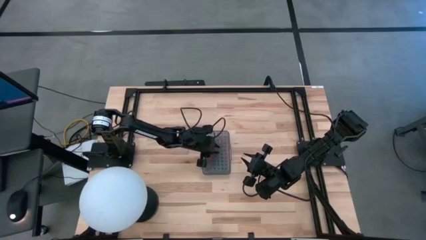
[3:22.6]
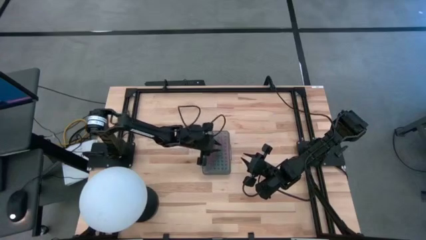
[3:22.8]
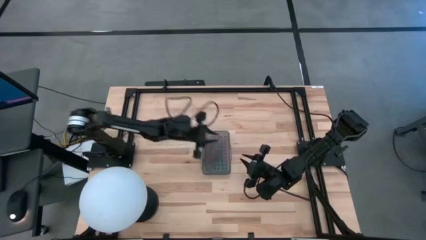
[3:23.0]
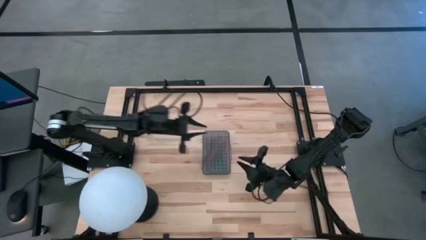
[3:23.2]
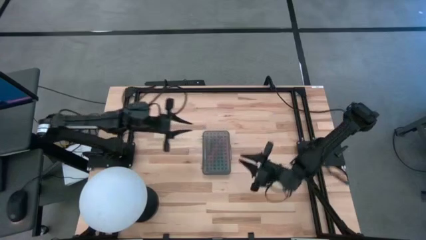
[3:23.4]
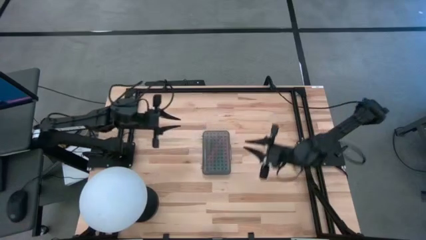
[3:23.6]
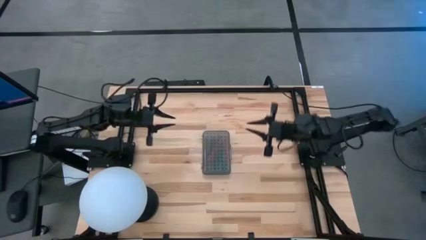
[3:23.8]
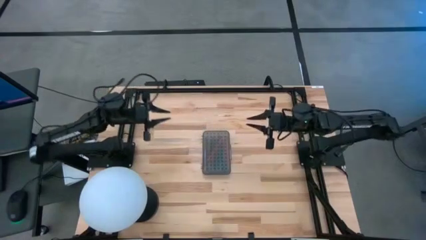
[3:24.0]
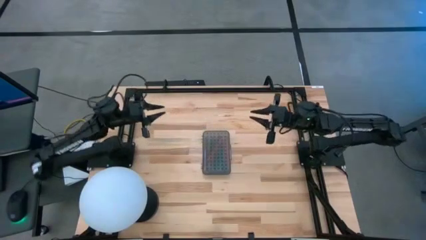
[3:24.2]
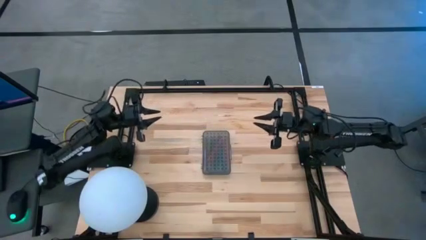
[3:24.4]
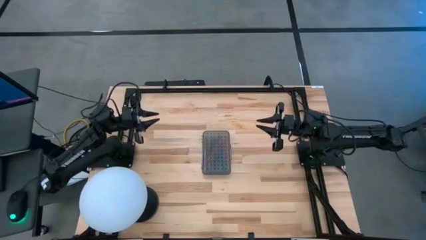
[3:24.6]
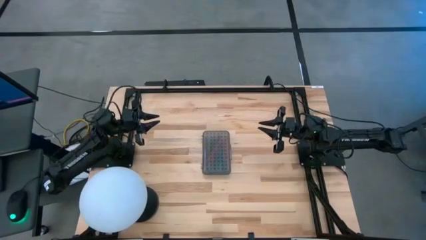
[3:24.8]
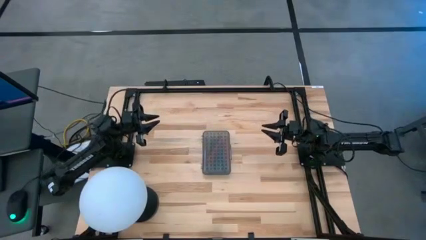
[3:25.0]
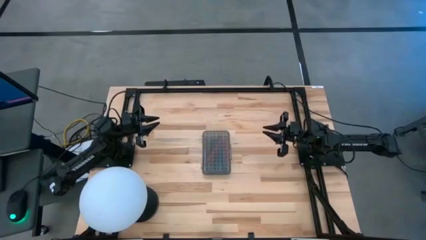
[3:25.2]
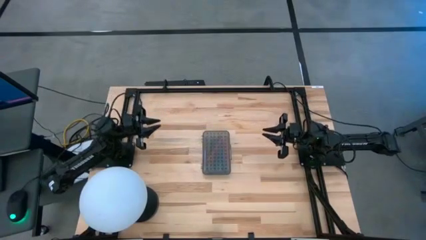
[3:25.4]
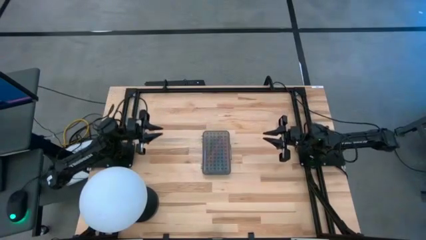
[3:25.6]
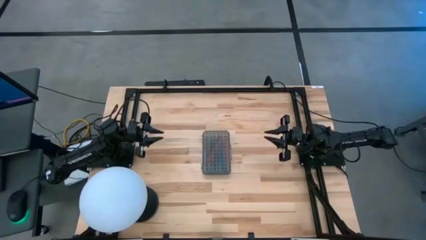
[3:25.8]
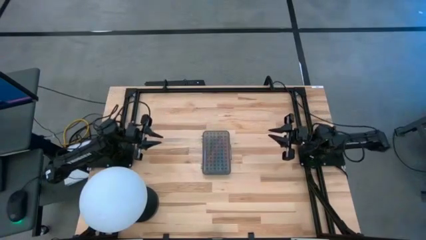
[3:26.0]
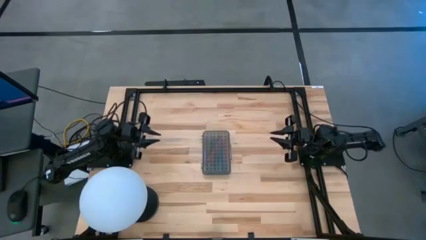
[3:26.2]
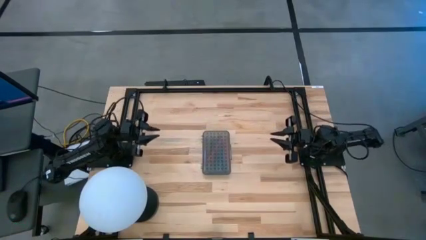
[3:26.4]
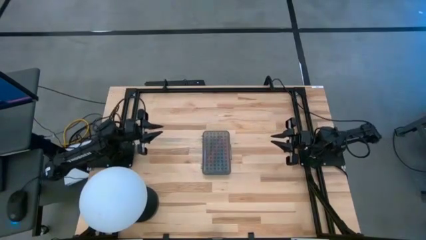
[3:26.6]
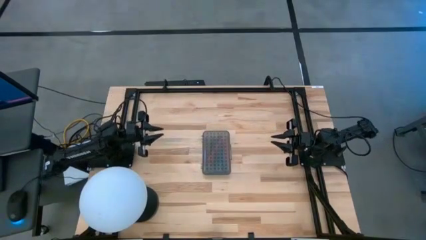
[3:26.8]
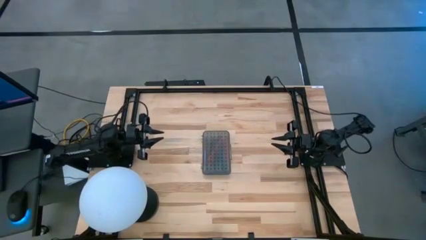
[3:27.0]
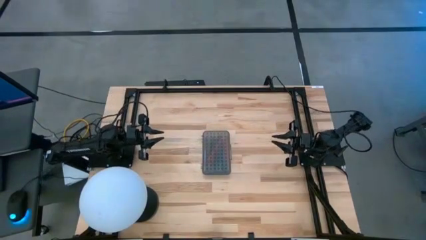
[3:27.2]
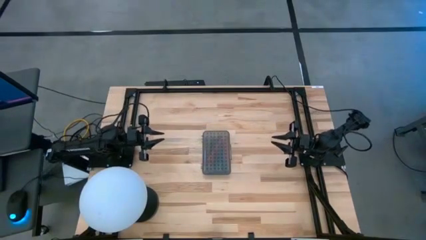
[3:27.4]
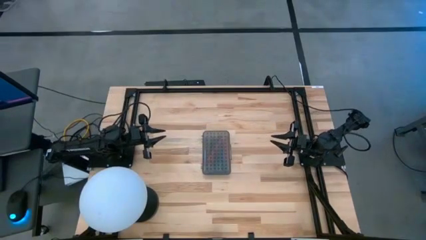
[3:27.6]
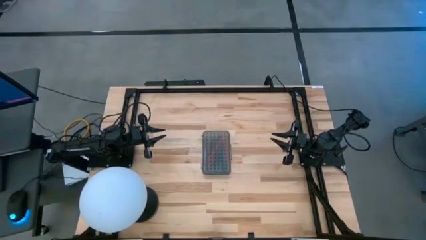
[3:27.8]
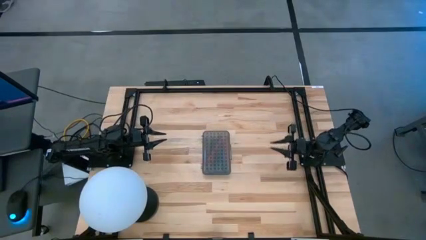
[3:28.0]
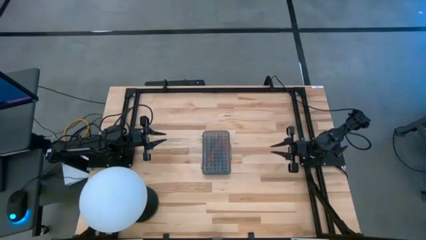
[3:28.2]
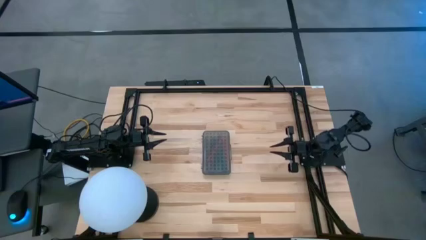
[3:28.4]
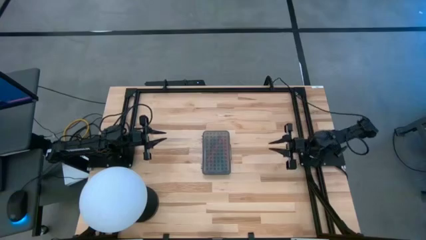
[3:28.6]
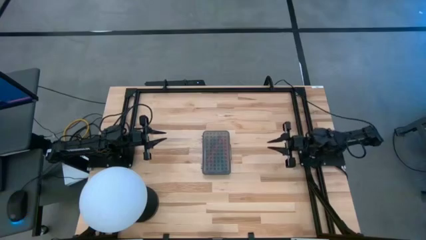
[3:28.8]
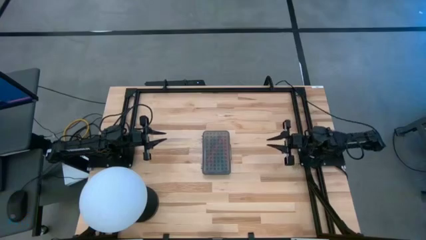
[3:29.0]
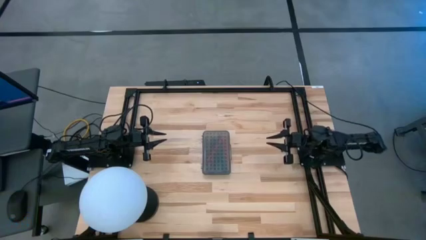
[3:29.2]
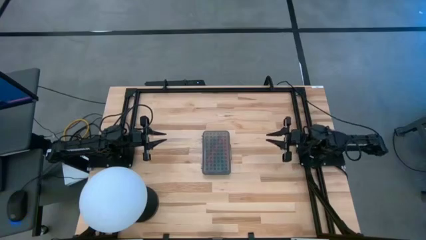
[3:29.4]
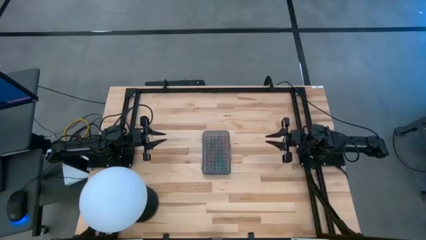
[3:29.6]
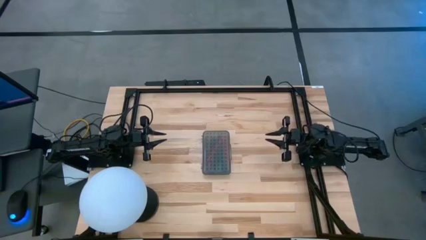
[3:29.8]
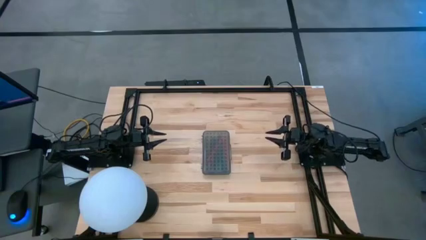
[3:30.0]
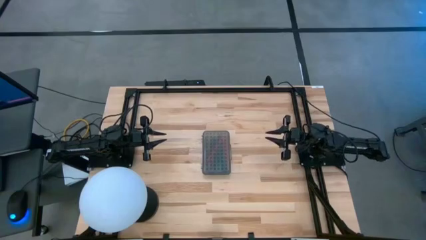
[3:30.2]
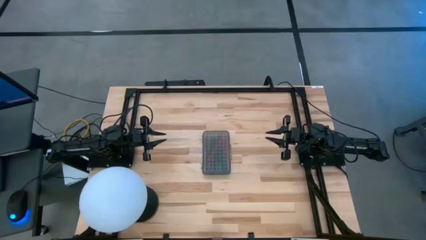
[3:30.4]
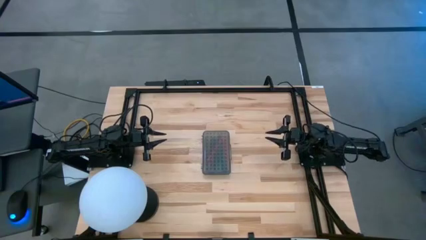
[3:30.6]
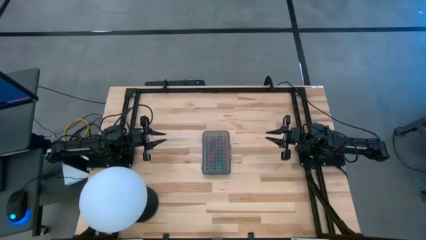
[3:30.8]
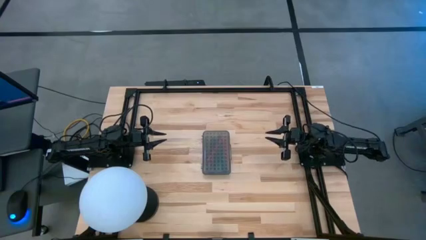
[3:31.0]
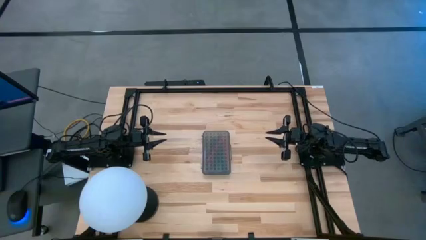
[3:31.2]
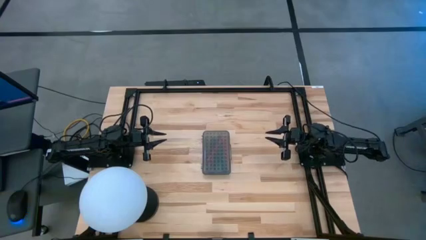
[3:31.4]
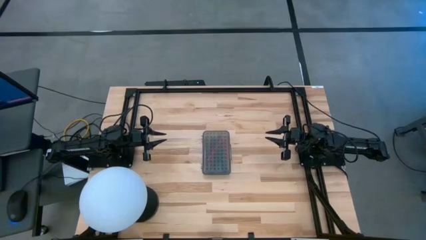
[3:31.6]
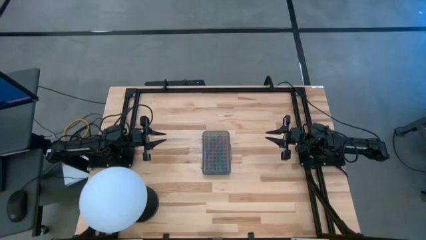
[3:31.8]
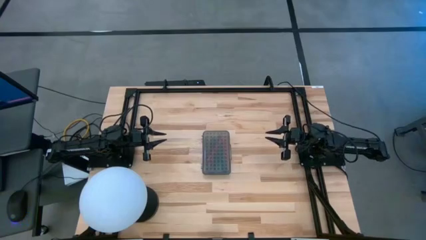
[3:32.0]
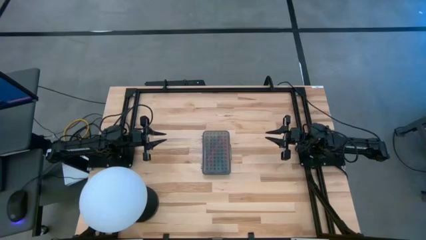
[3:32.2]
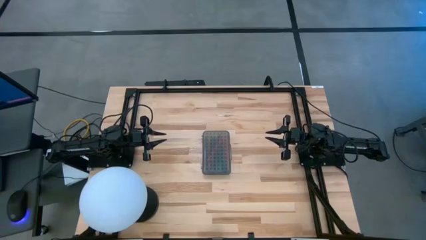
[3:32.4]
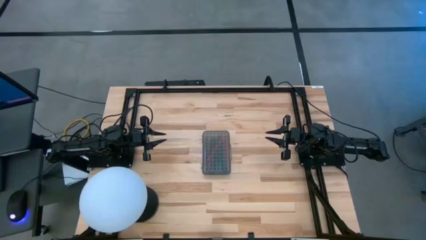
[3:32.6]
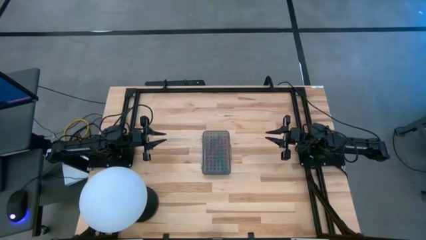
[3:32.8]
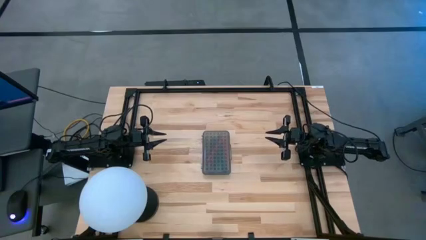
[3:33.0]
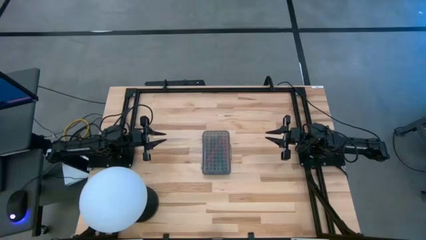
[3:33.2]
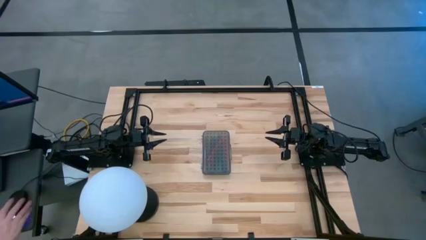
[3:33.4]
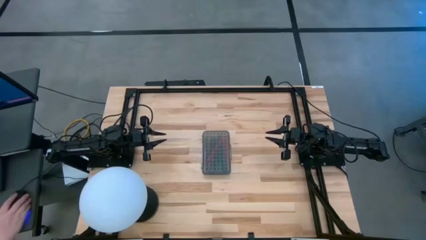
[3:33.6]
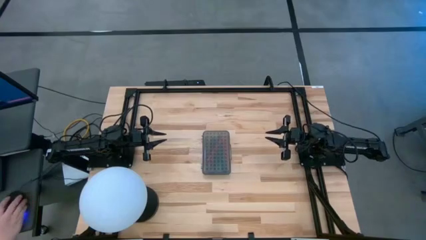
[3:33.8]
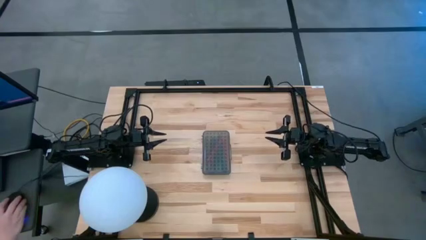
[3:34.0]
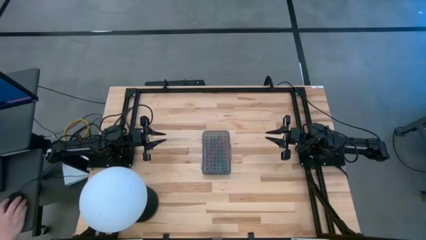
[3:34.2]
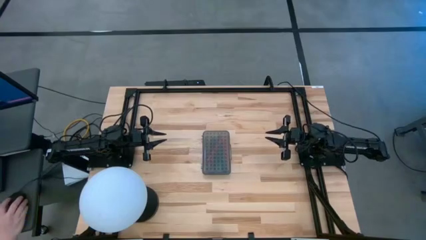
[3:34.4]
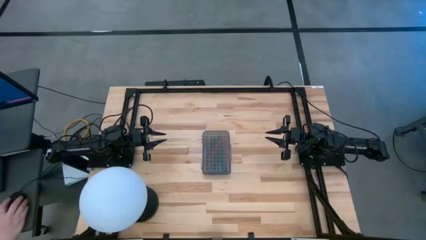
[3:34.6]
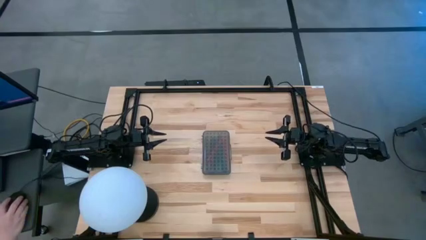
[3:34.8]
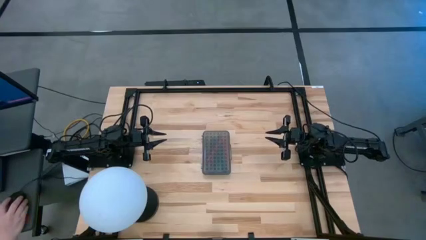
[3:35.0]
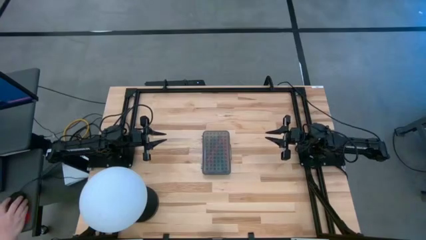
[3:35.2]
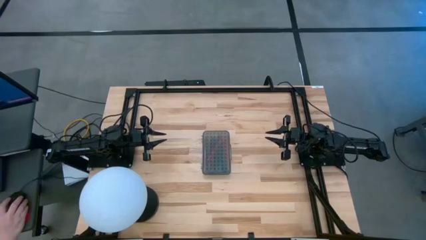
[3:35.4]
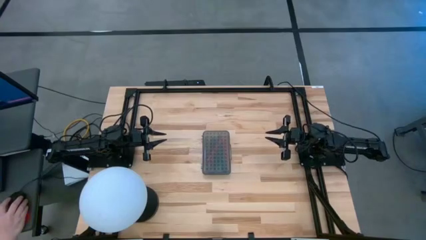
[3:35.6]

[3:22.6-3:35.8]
Task: Pick & place school supplies into a supply box
Return to Home Position

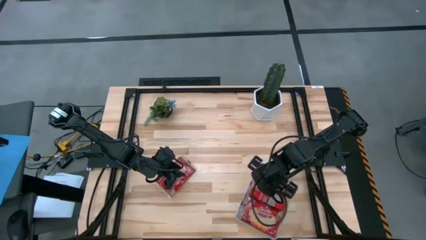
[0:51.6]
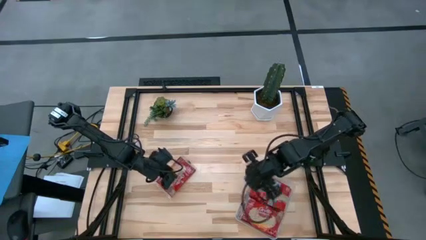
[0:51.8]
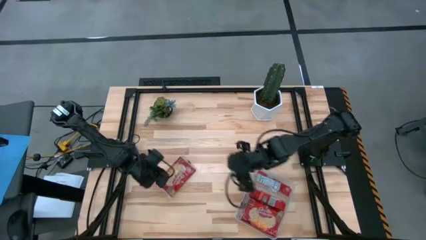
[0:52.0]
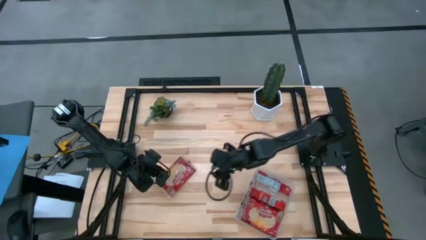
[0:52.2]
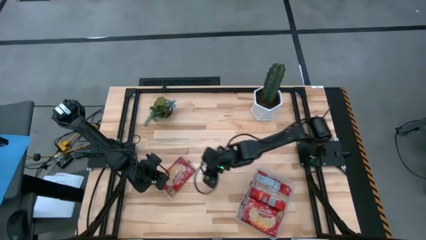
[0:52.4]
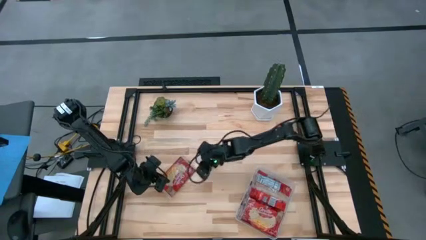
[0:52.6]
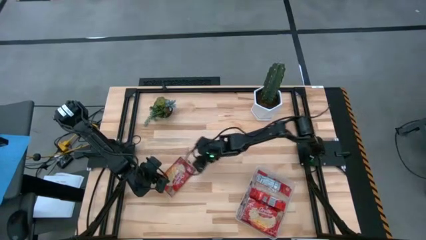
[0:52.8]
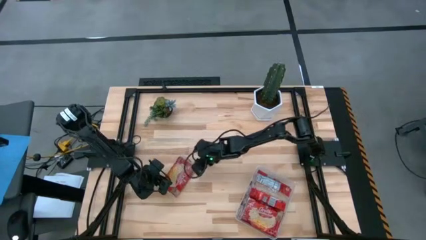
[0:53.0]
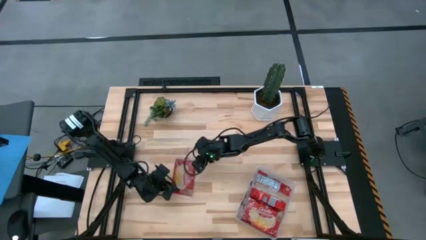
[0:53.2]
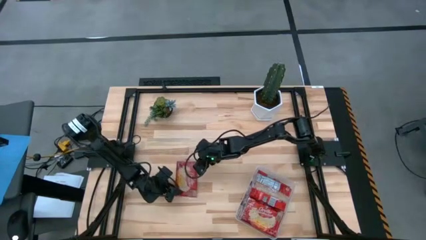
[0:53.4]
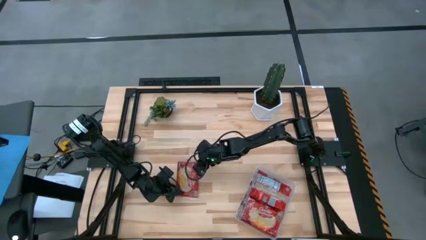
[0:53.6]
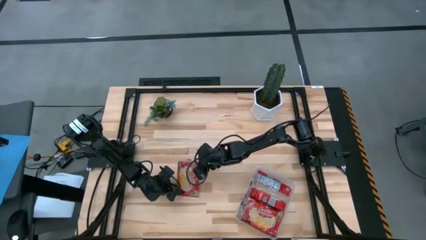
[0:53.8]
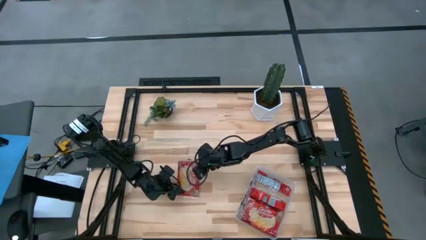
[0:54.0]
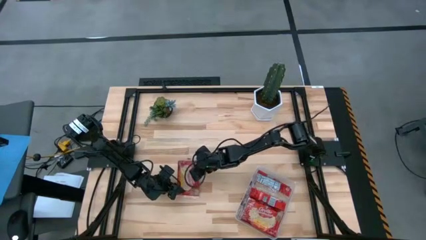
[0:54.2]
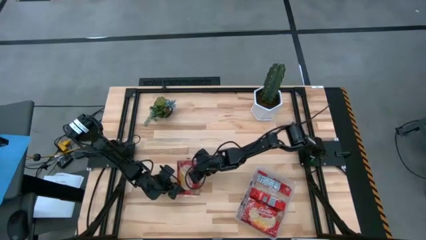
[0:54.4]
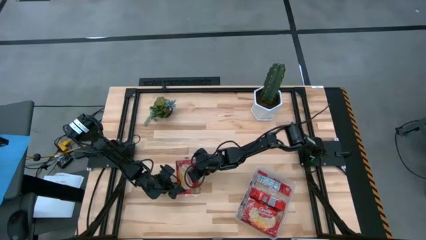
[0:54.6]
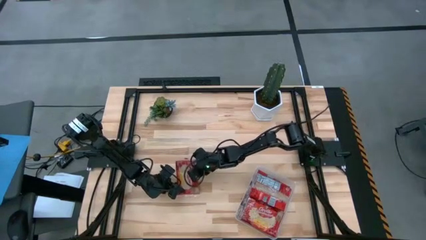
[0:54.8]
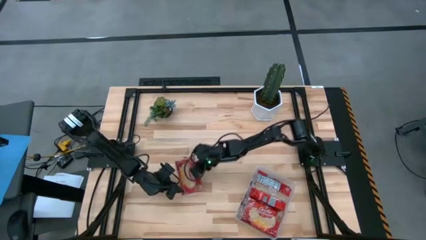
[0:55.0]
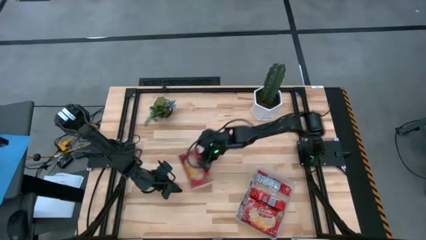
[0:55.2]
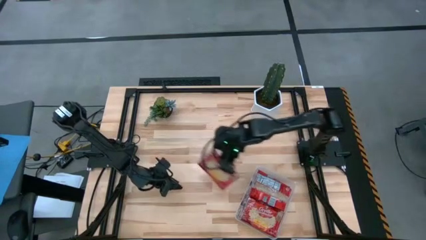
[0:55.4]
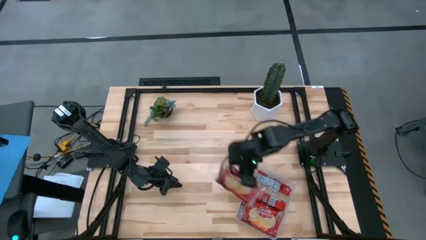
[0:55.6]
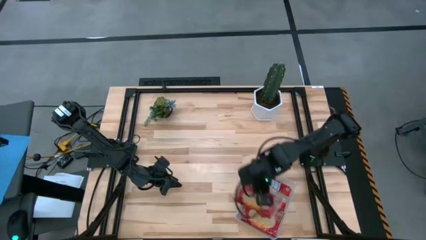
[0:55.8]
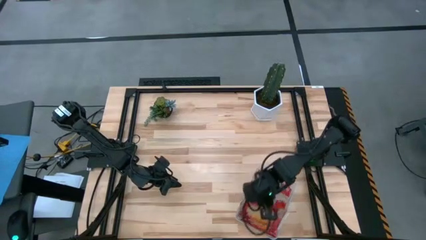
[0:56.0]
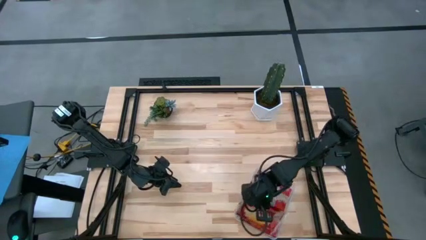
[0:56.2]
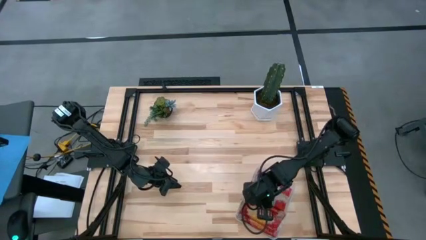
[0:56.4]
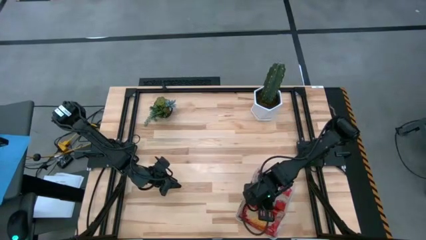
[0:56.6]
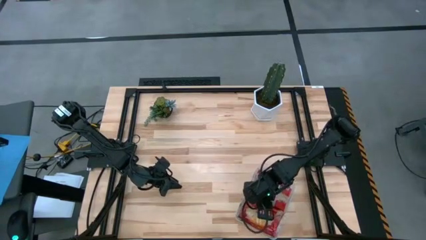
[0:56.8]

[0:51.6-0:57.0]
Task: Sort popcorn bags into baskets
Put the red popcorn bag into the transparent bin
